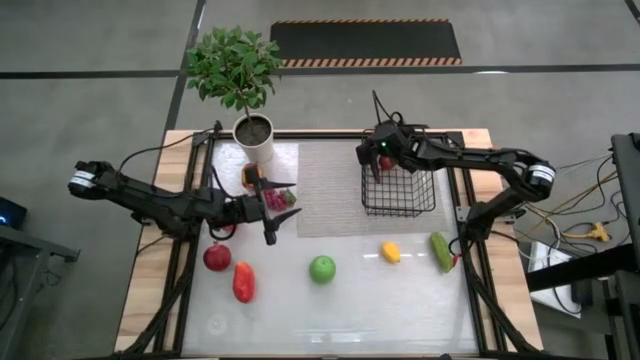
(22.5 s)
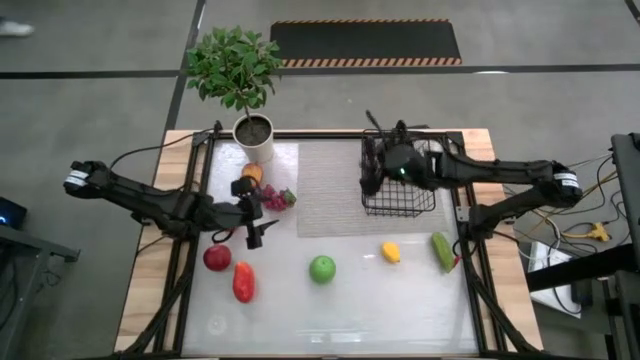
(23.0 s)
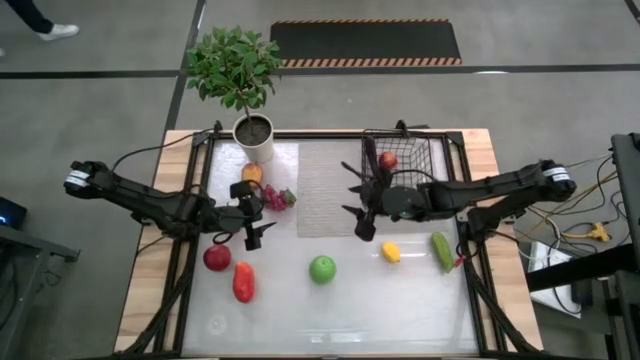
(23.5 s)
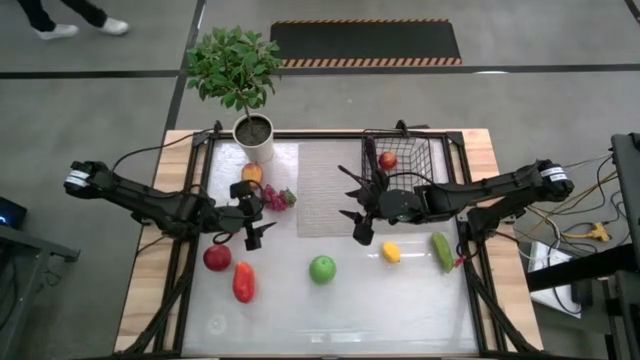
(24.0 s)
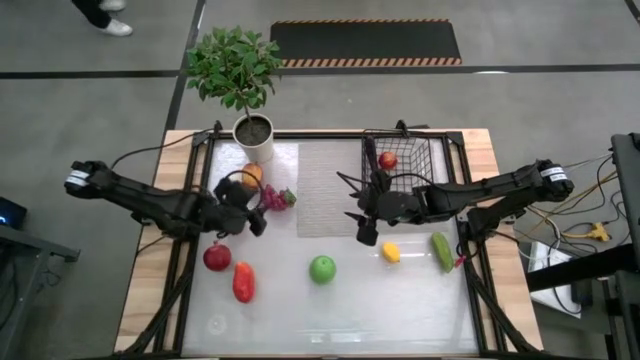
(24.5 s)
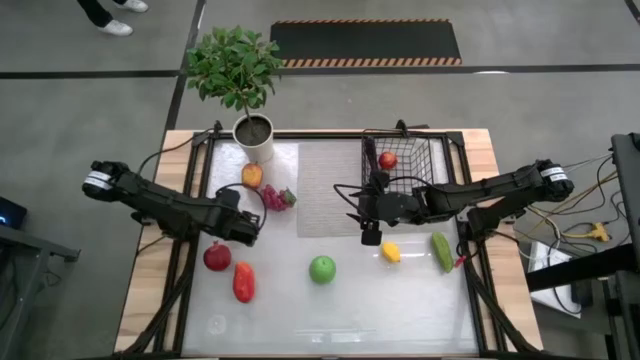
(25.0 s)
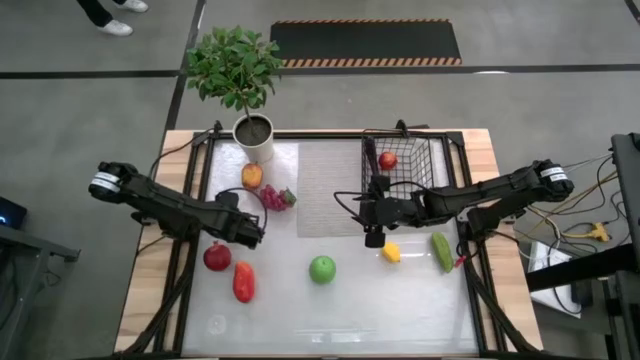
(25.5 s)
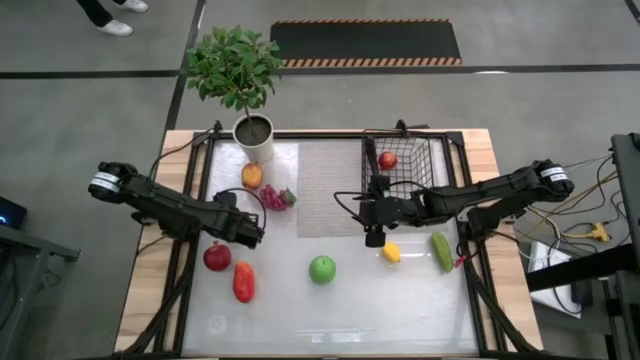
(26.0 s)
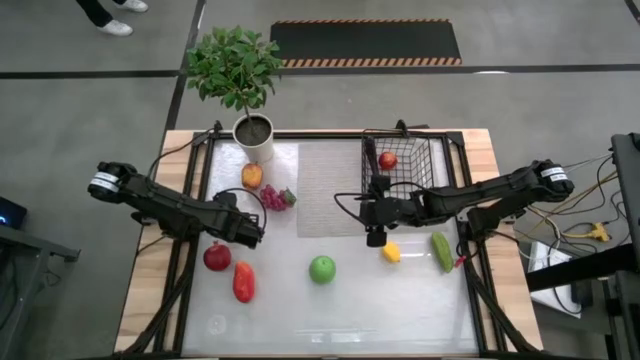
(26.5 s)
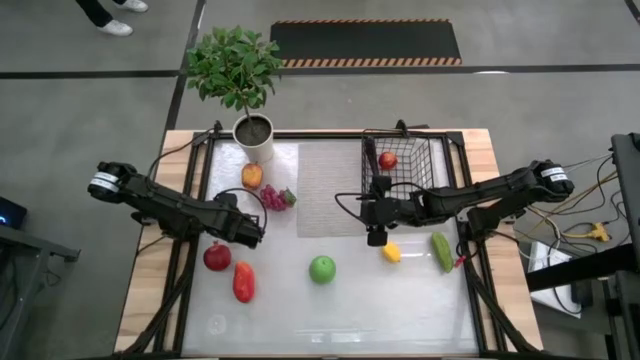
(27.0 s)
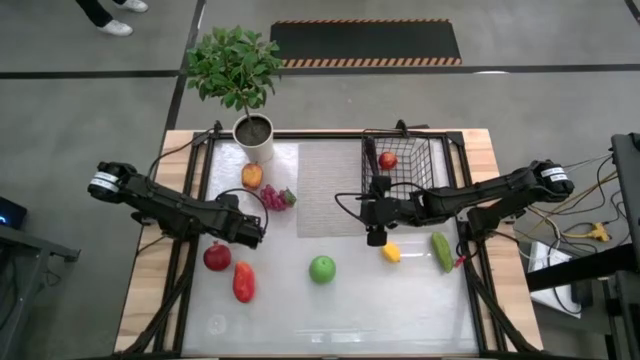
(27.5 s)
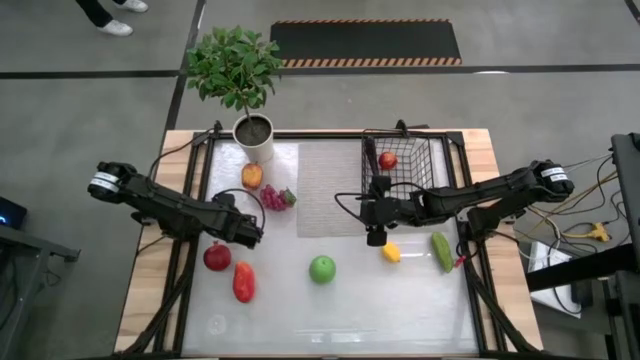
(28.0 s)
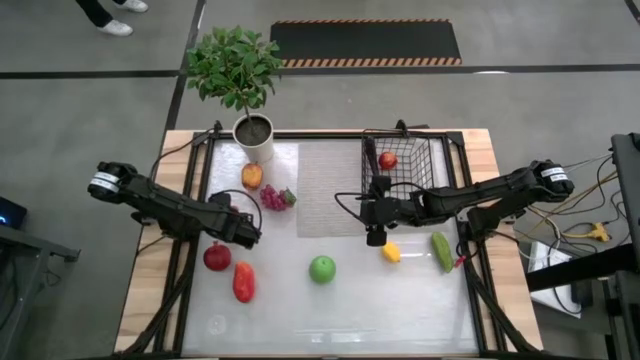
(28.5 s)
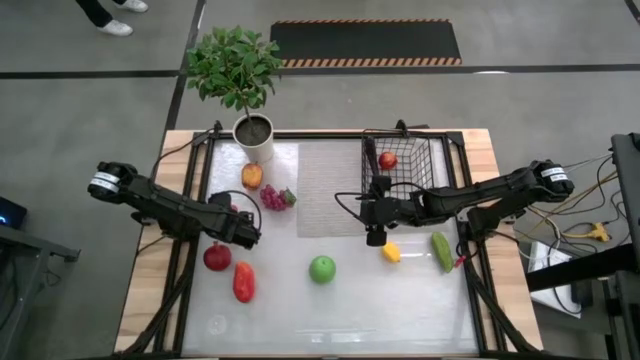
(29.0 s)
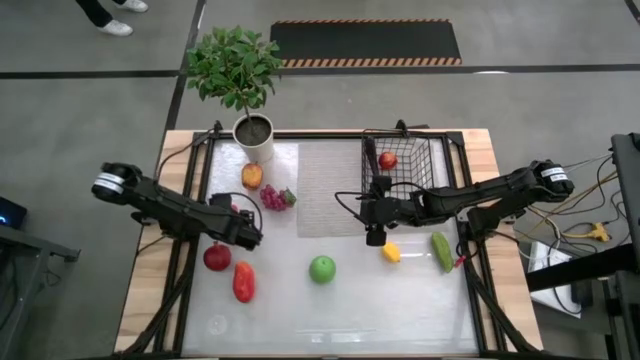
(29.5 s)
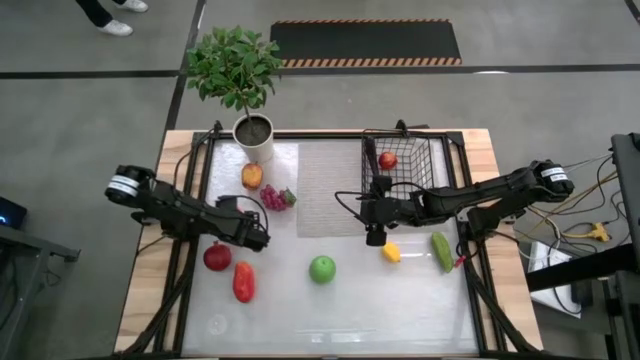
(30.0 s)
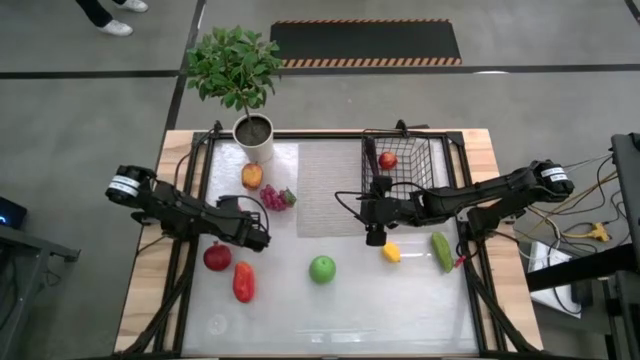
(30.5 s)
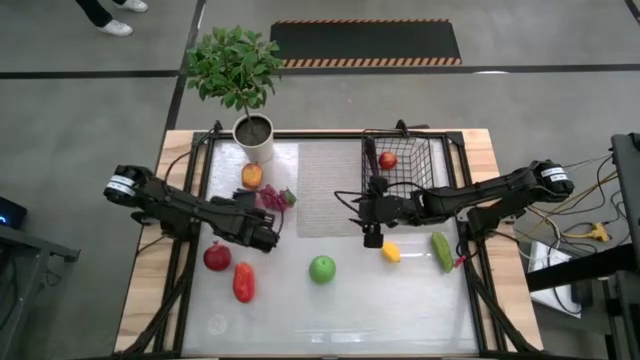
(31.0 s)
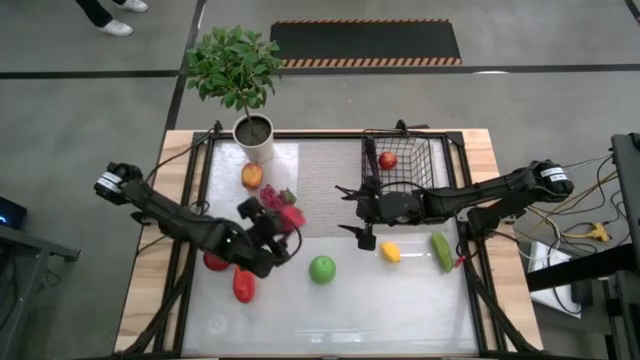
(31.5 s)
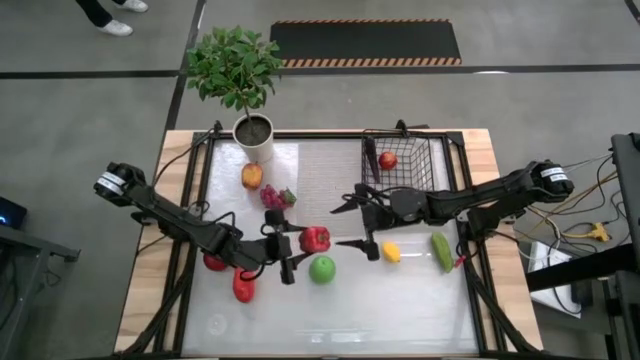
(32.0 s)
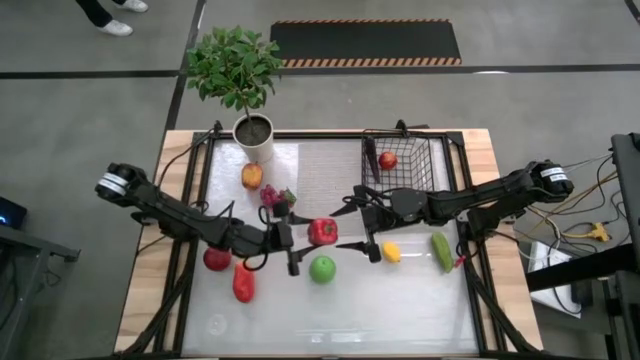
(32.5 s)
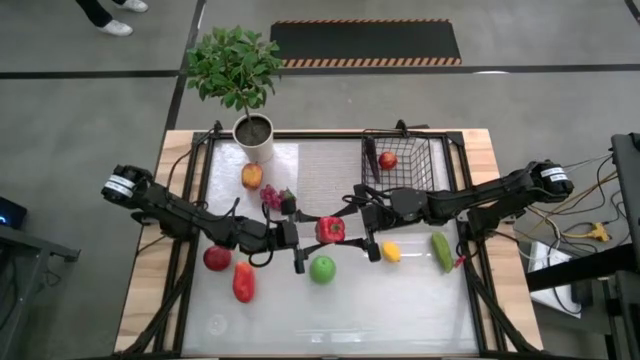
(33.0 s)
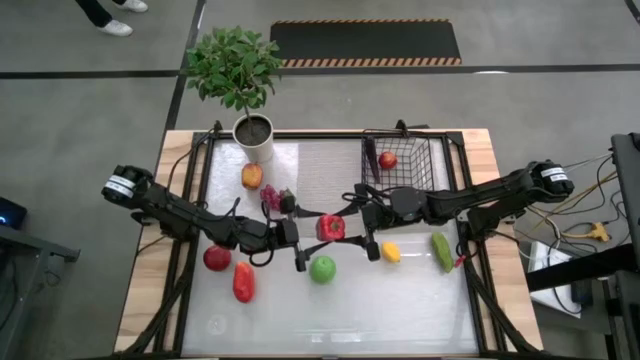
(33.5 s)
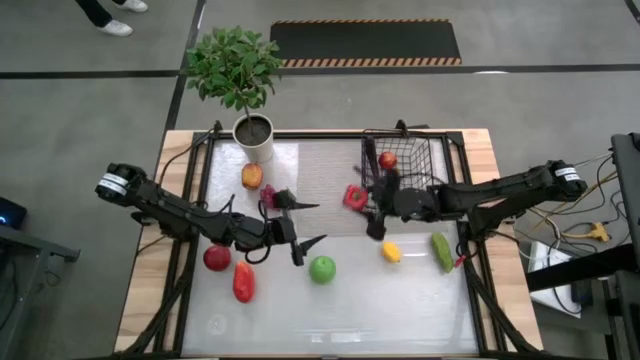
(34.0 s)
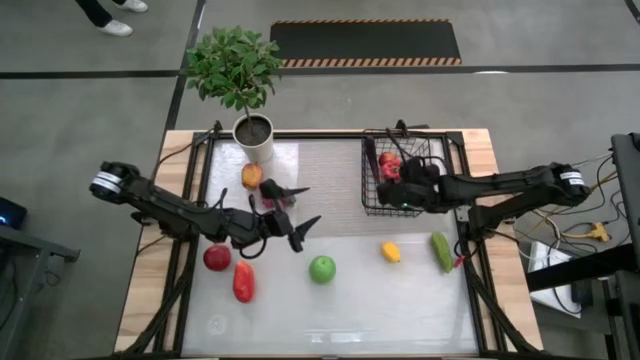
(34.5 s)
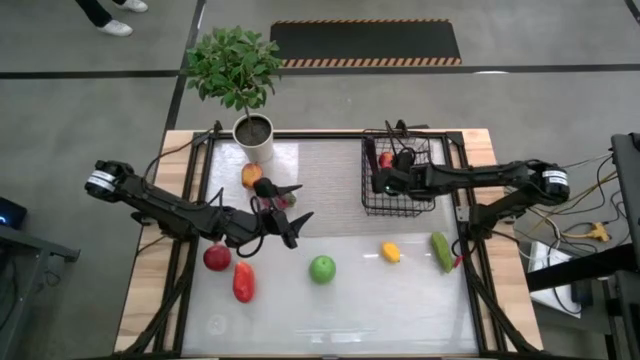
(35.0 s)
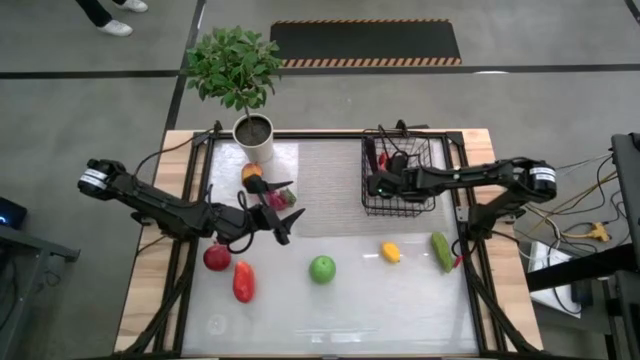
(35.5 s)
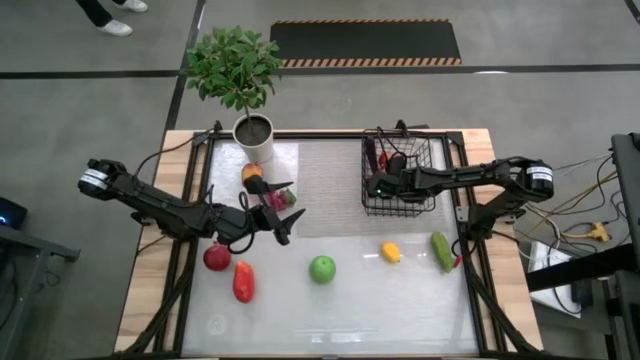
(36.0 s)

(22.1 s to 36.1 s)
Task: Build produce basket
Put the red bell pepper into the wire basket

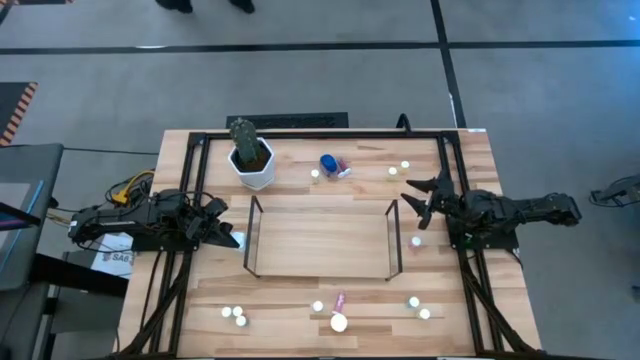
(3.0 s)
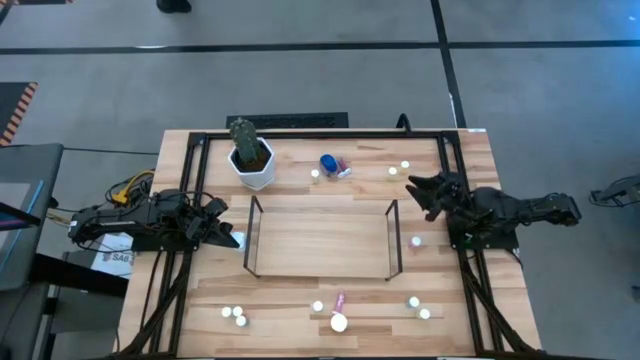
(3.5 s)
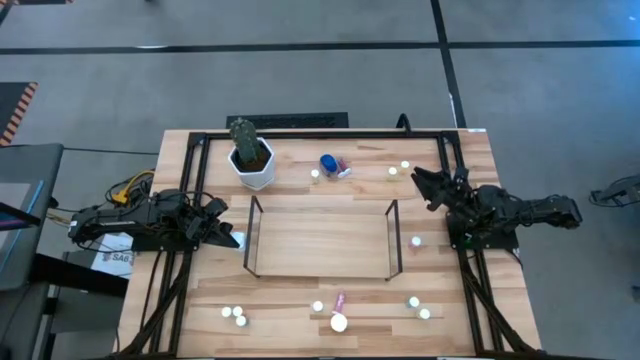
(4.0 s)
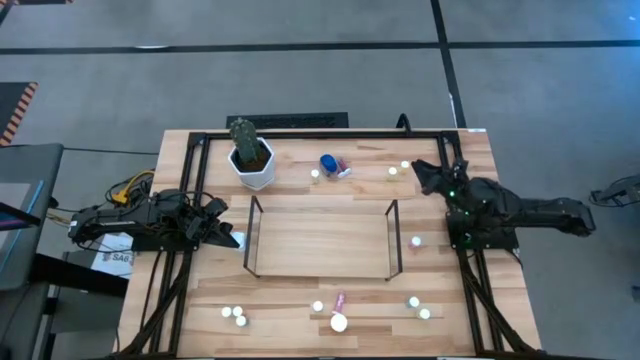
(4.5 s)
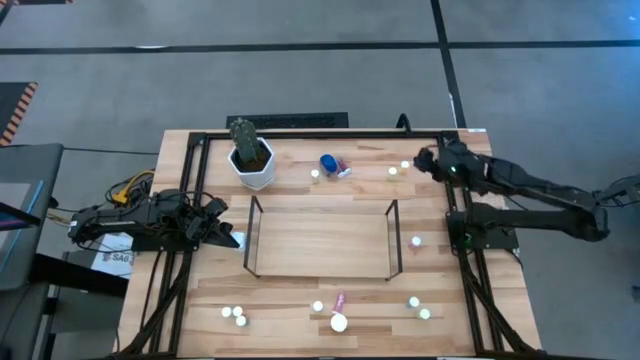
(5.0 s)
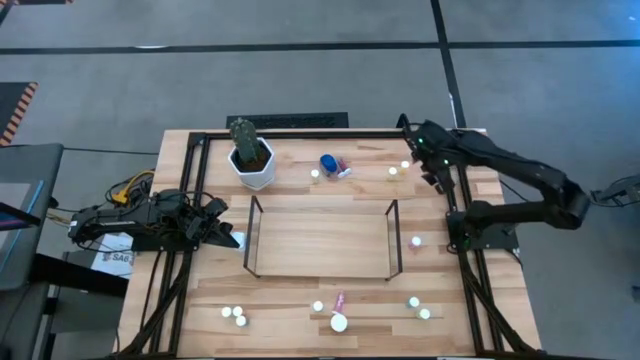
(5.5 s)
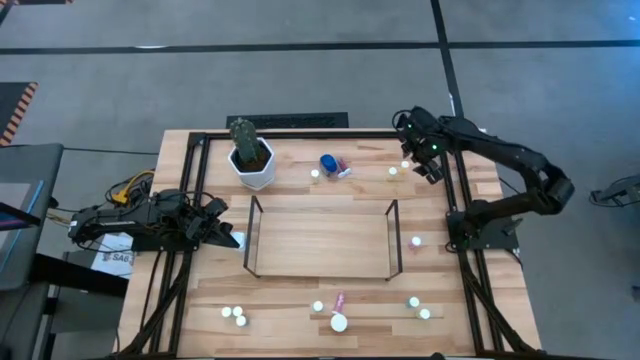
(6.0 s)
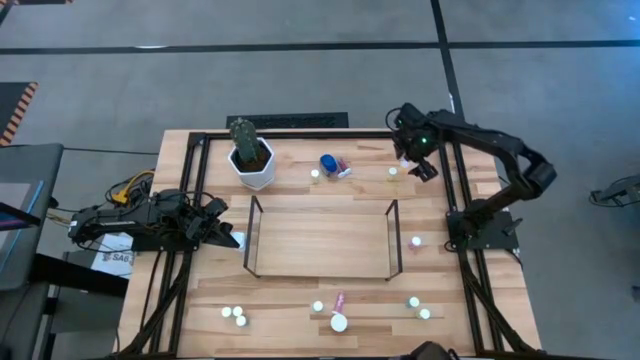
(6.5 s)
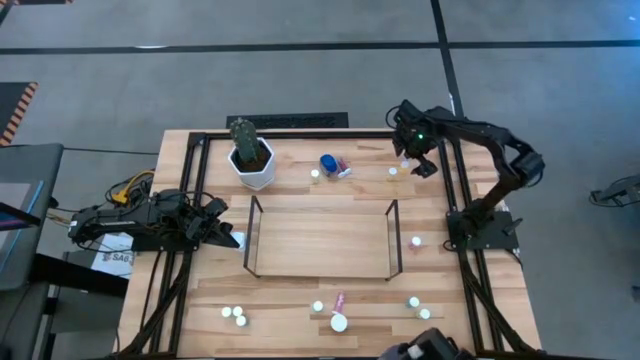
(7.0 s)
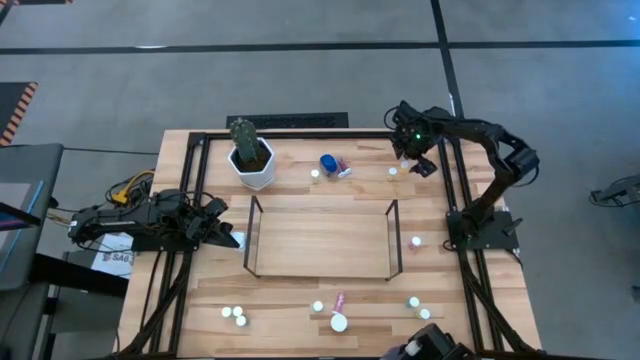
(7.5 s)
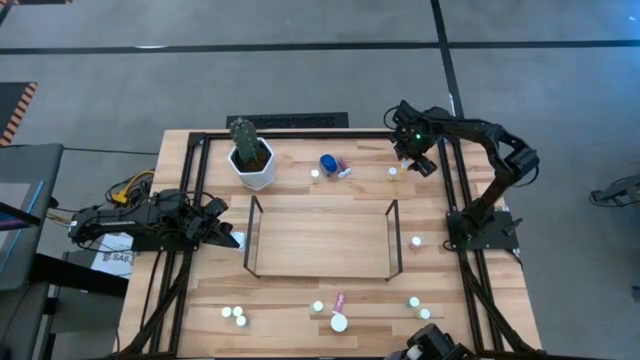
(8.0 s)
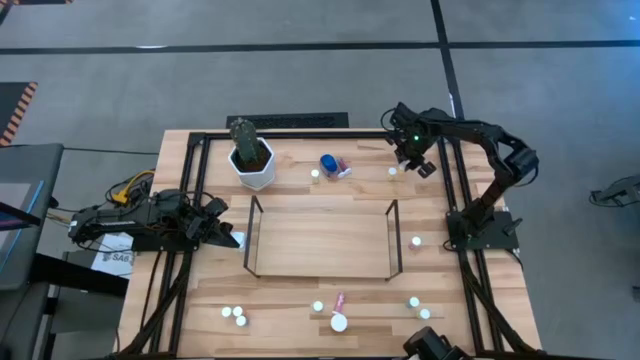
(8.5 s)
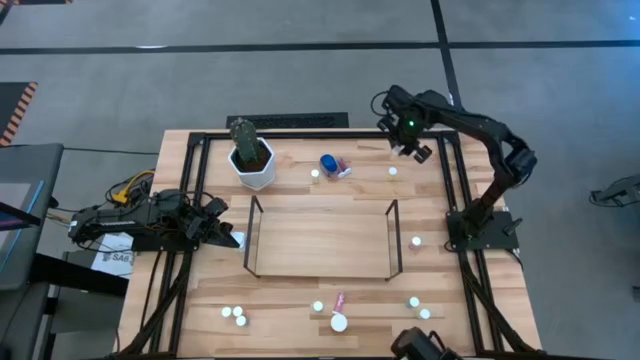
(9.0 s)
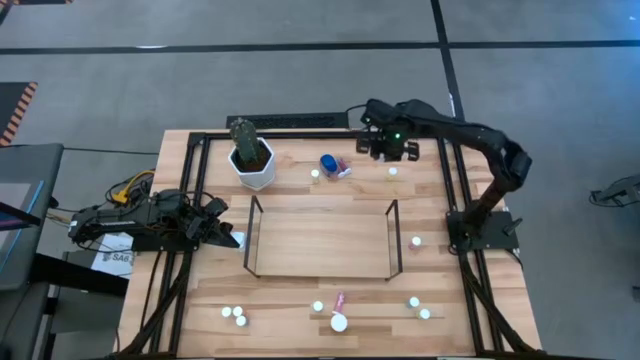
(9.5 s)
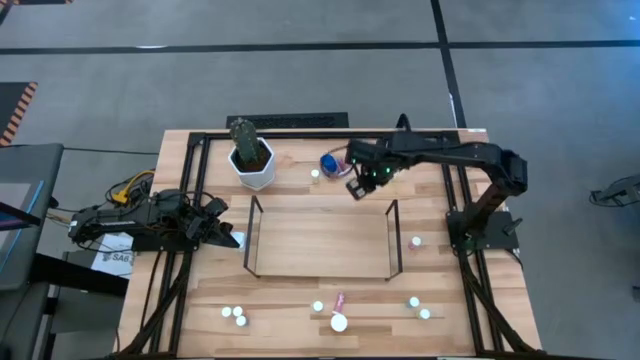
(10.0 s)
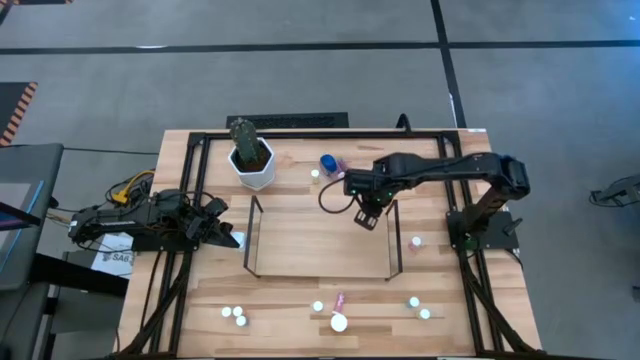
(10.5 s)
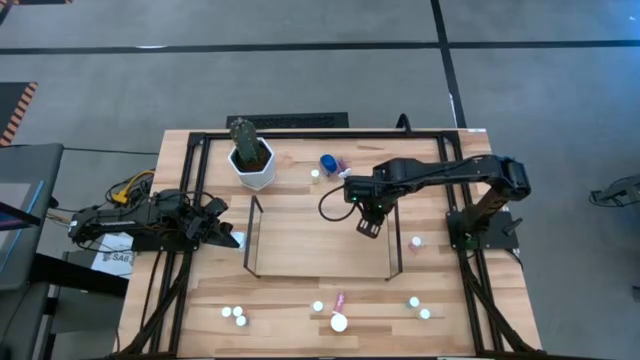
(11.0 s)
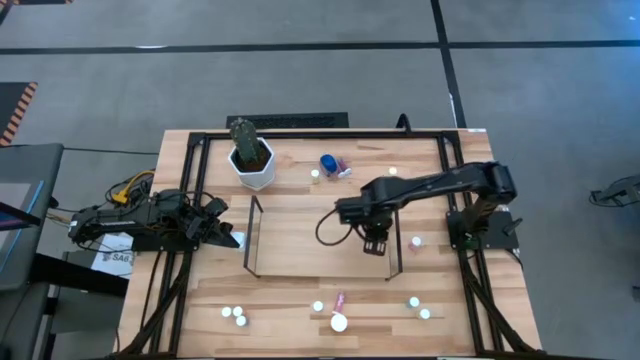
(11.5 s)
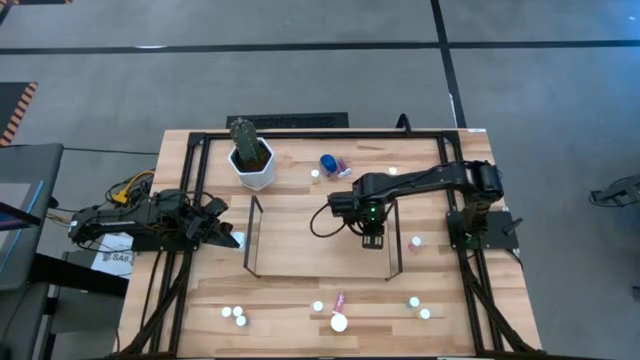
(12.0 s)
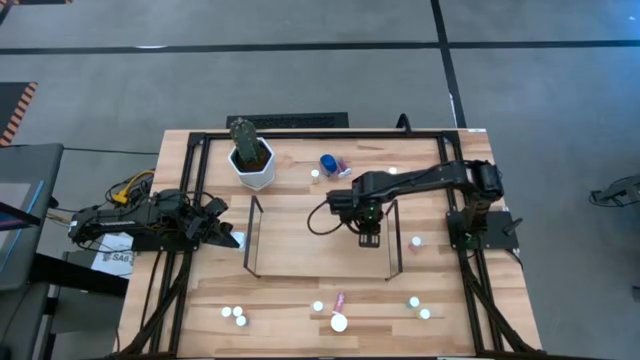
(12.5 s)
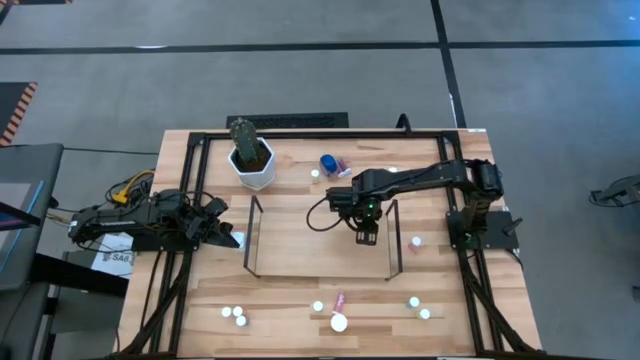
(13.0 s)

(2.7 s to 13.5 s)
Task: Pick and place medicine bottles onto shelf by color
Put the orange pill bottle on the shelf
